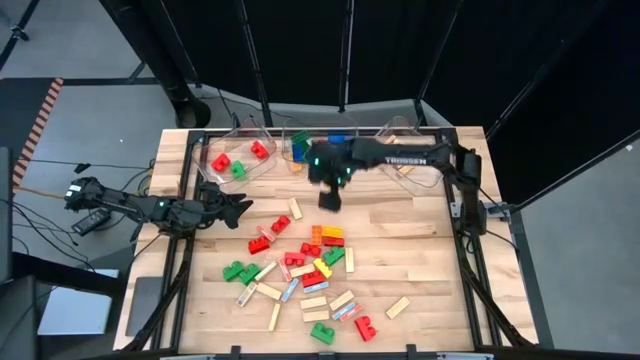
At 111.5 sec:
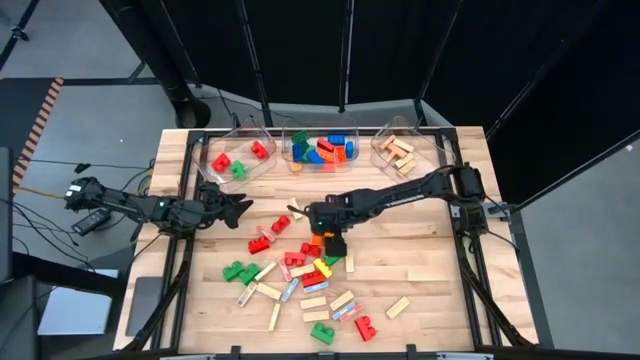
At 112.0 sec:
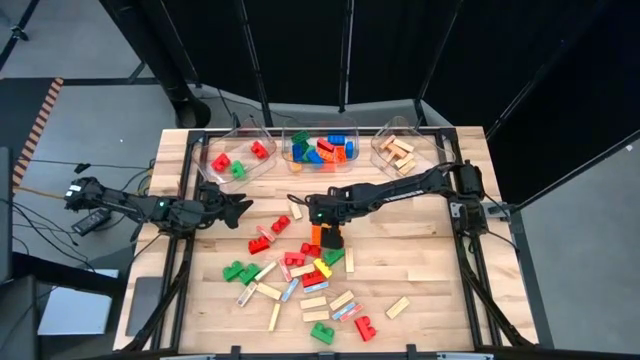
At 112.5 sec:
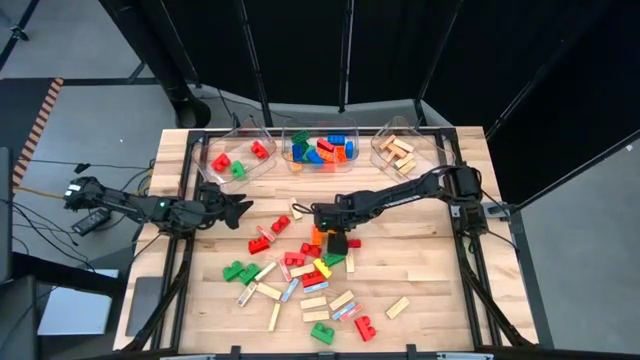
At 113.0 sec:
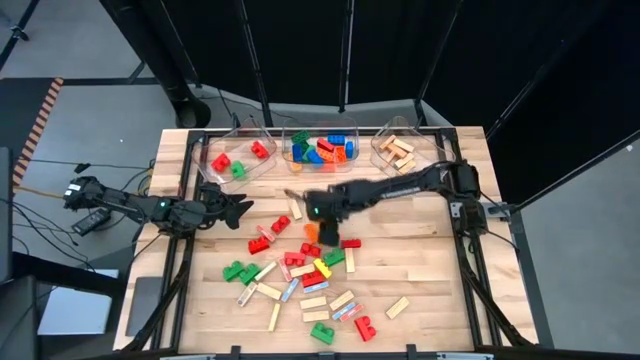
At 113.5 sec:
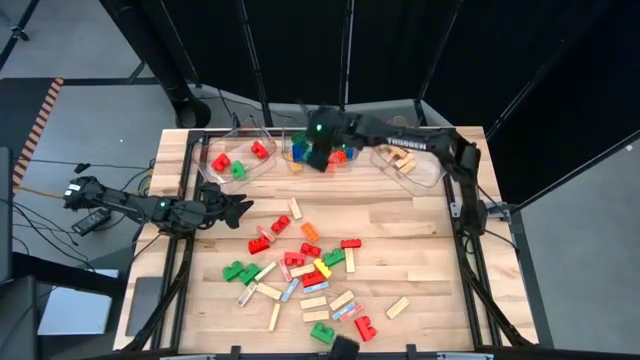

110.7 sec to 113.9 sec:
Task: Sort blocks by size
Put the large yellow game piece into the middle transparent bin

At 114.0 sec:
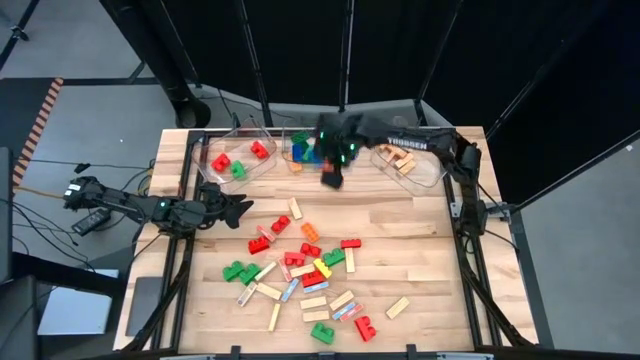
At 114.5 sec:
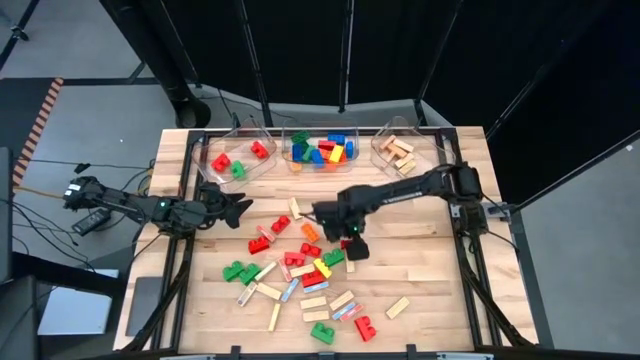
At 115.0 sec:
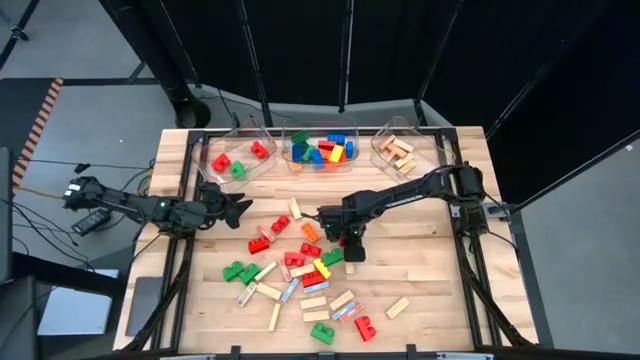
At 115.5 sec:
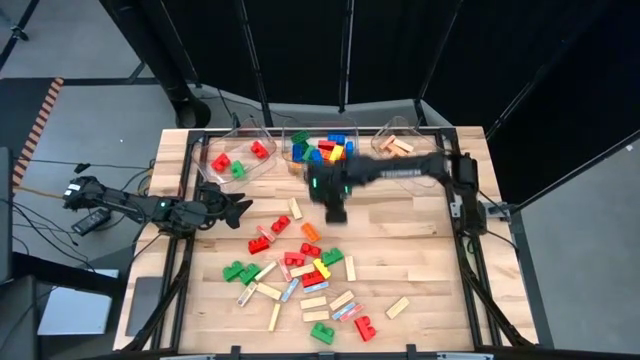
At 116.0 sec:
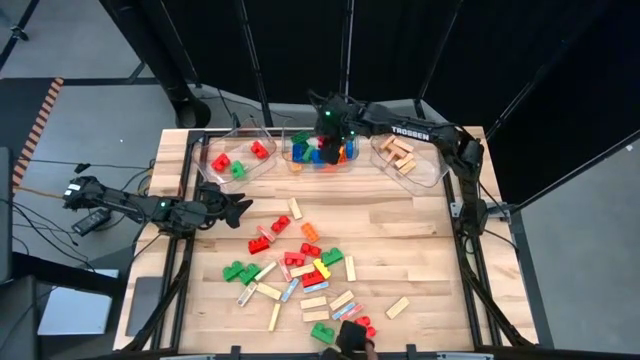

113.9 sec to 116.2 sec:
Put the large red game piece into the middle transparent bin

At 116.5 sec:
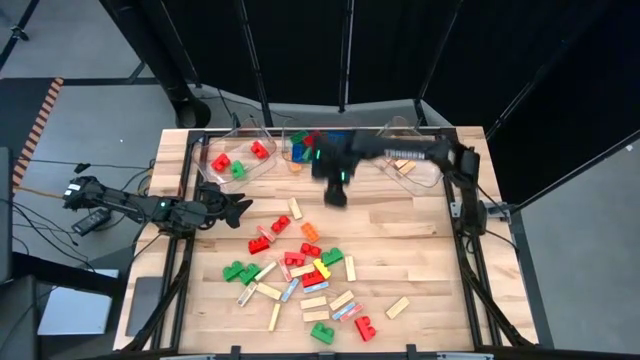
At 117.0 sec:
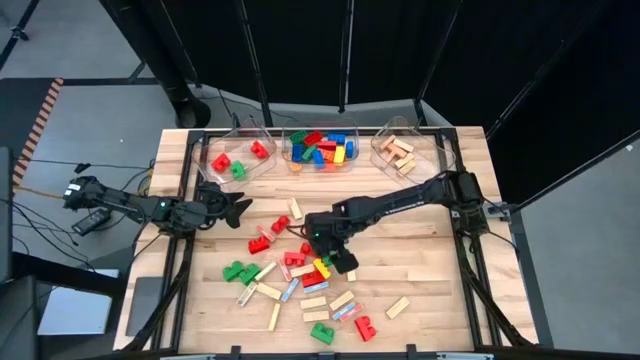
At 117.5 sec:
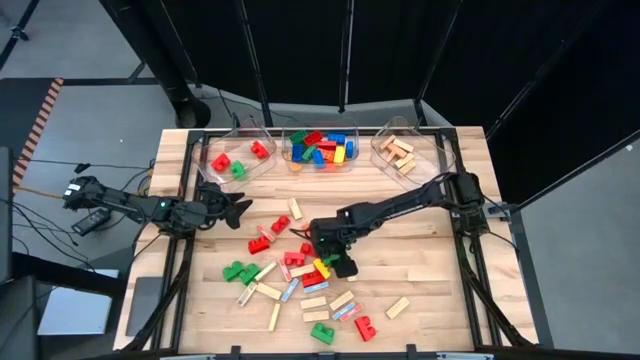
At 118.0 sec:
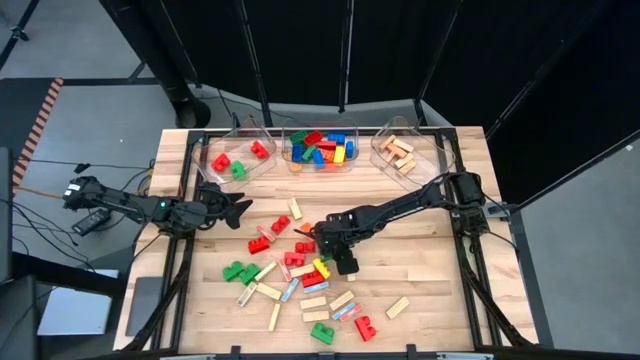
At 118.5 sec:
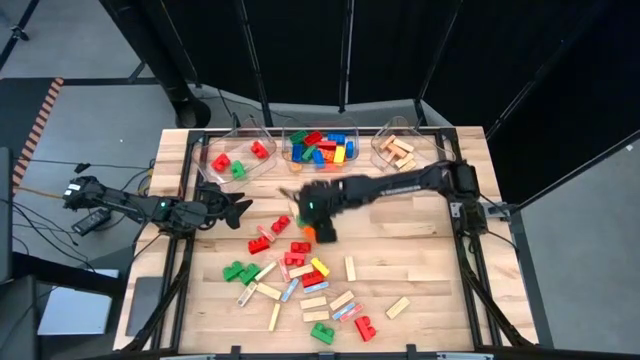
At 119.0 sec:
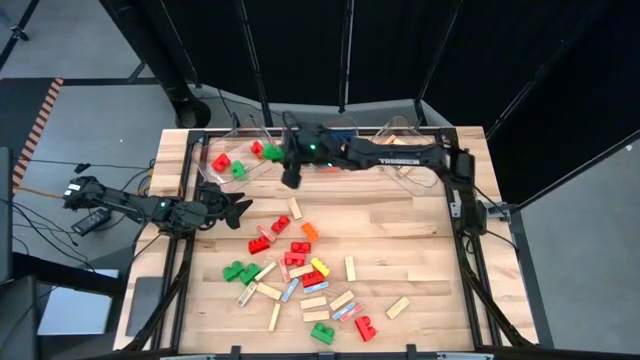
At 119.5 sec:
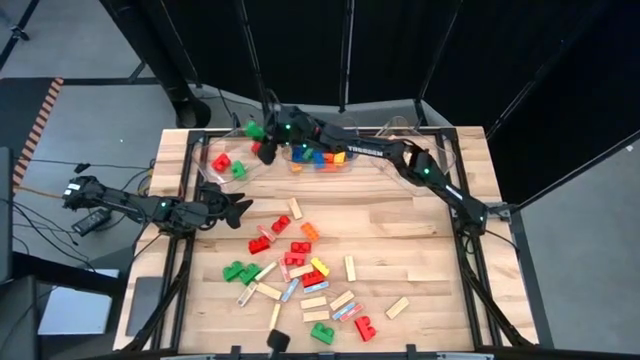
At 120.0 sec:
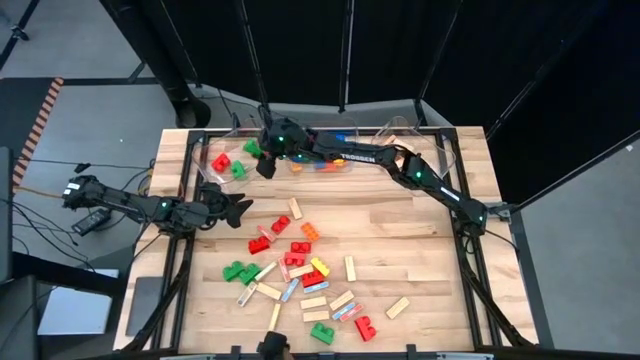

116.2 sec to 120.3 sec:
Put the small green game piece into the left transparent bin

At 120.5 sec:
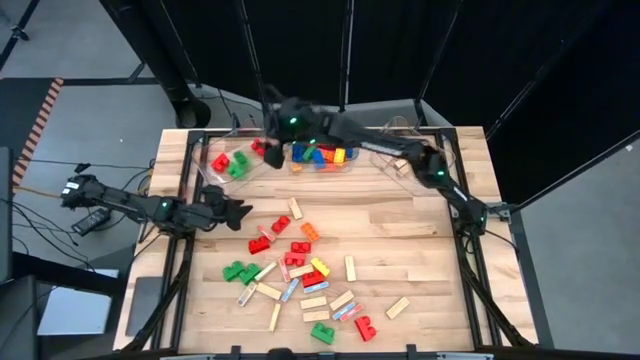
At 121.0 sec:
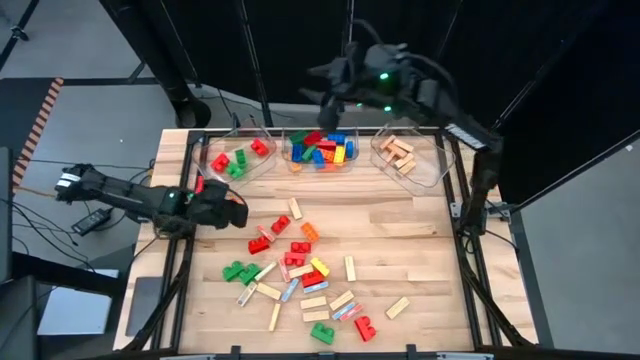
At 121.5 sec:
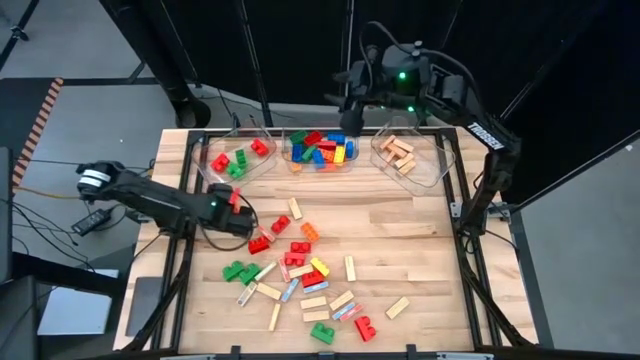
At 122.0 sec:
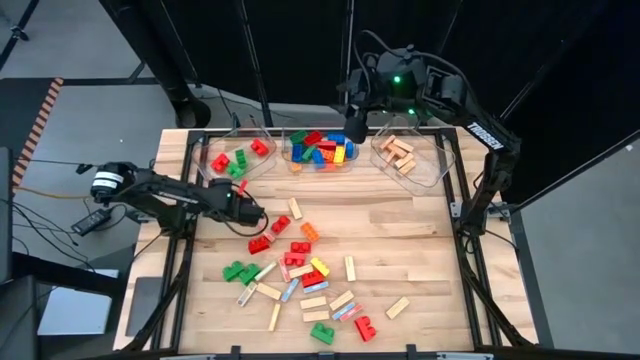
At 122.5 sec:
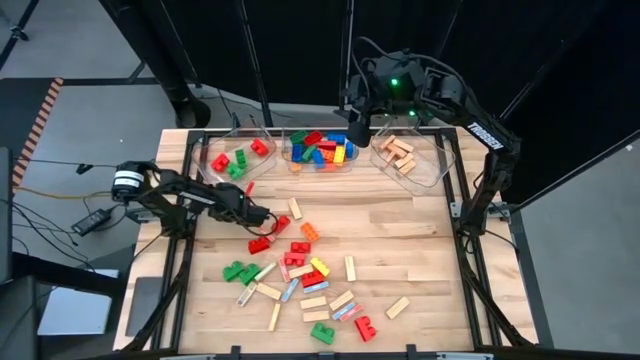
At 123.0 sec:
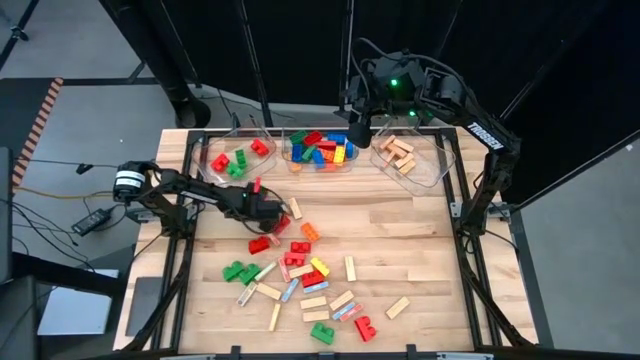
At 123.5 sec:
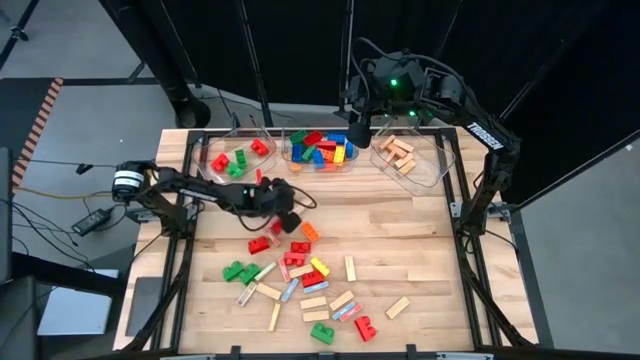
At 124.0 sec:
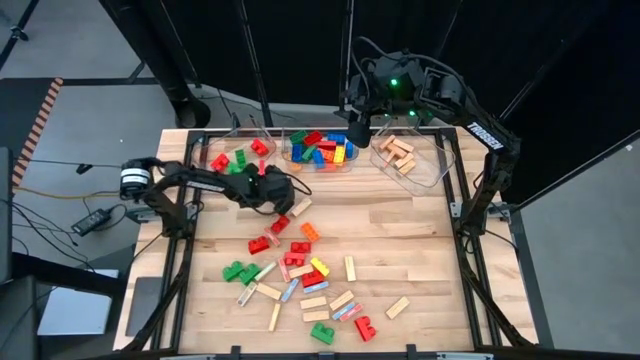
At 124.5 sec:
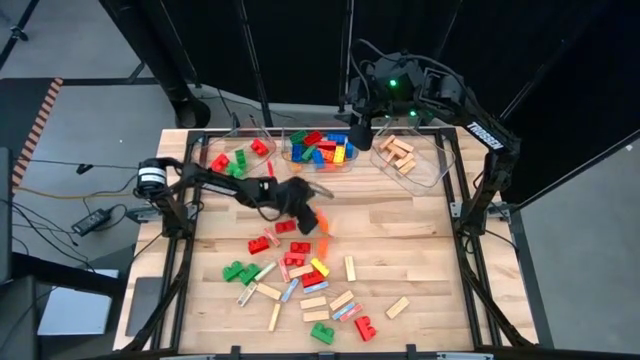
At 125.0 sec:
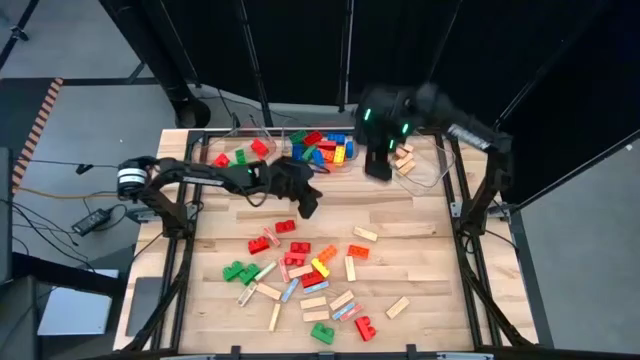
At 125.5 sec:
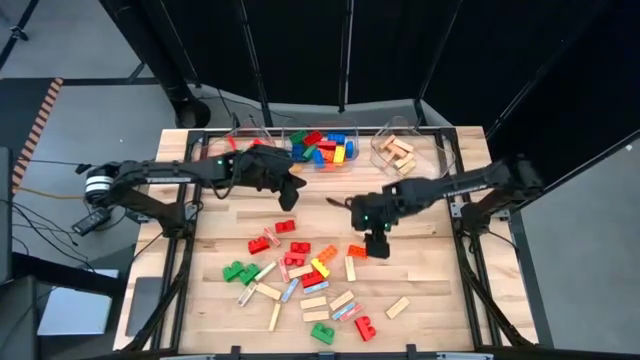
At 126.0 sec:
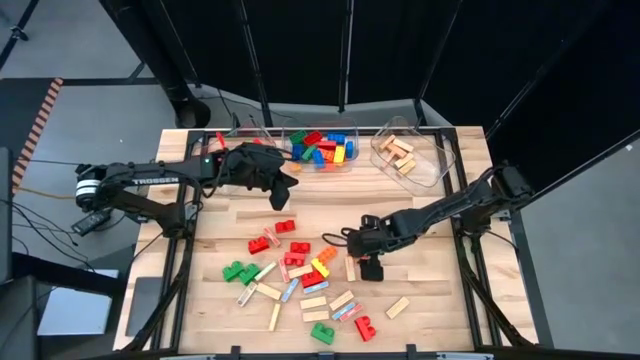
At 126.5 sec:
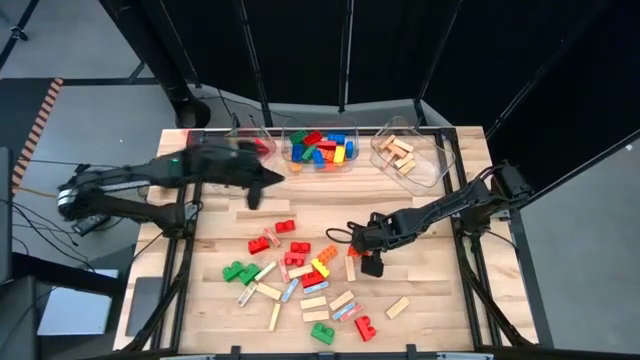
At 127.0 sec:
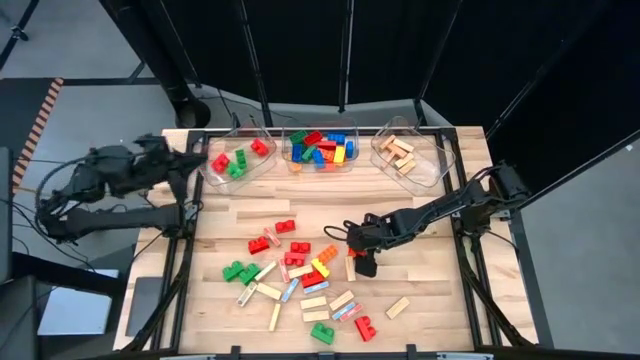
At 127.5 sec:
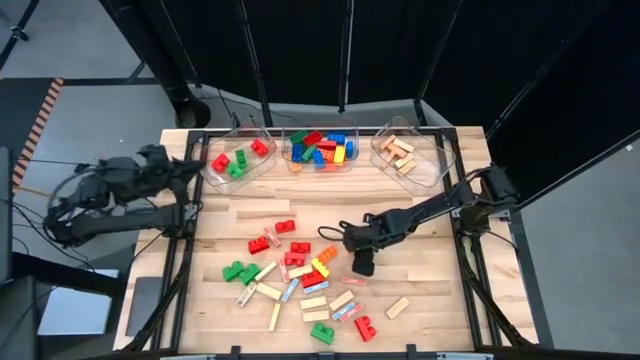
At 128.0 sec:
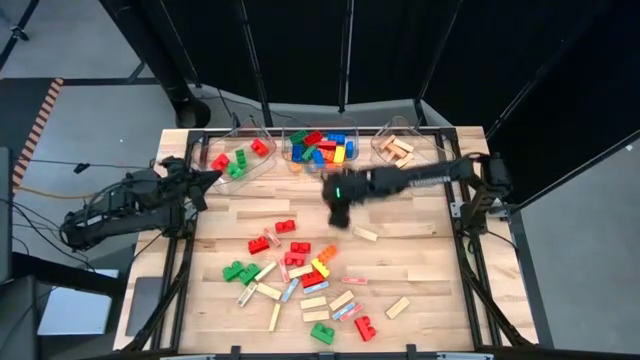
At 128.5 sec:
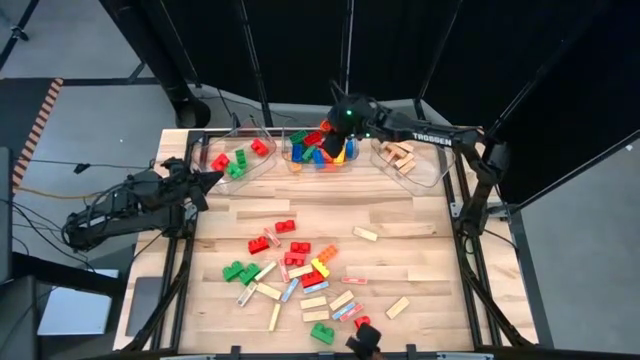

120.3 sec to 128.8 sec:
Put the large orange game piece into the middle transparent bin

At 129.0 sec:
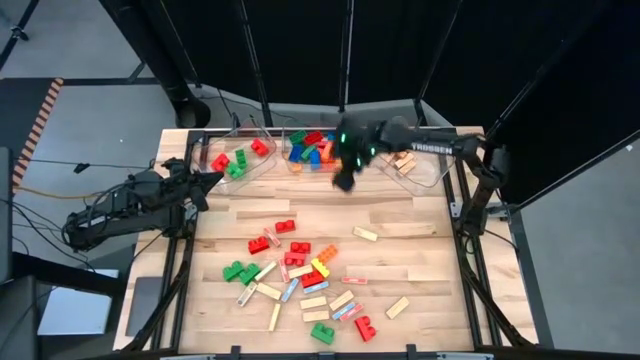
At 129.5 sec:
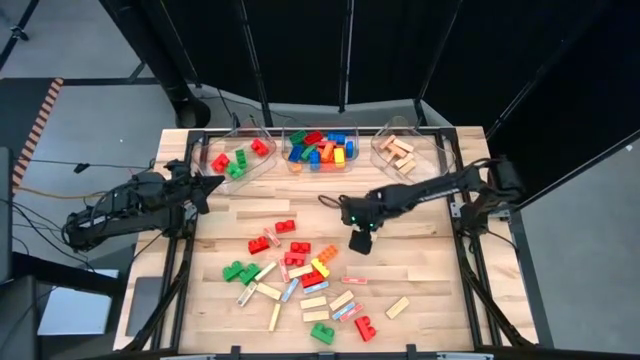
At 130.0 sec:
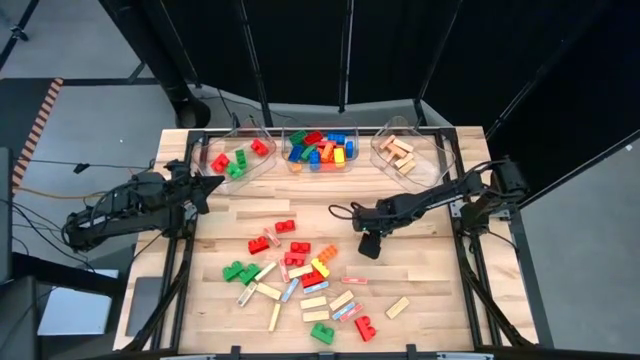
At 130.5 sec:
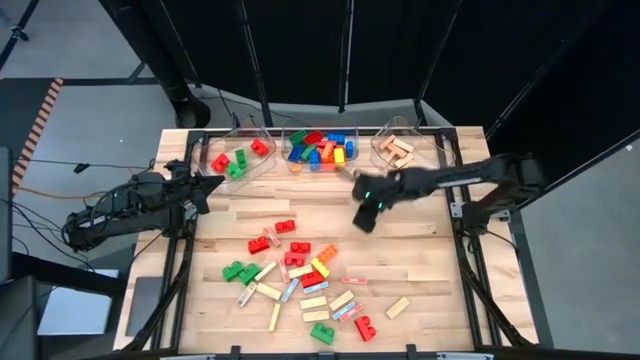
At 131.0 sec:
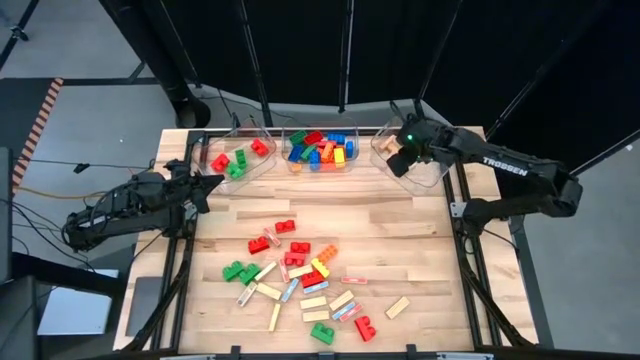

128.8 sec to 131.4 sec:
Put the brown wooden block into the right transparent bin

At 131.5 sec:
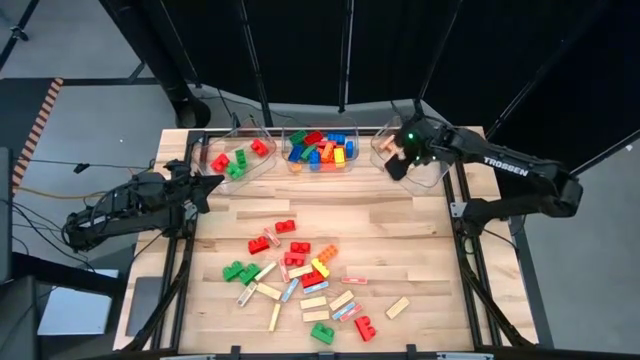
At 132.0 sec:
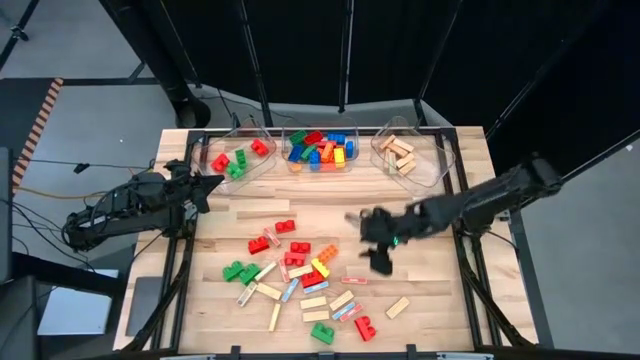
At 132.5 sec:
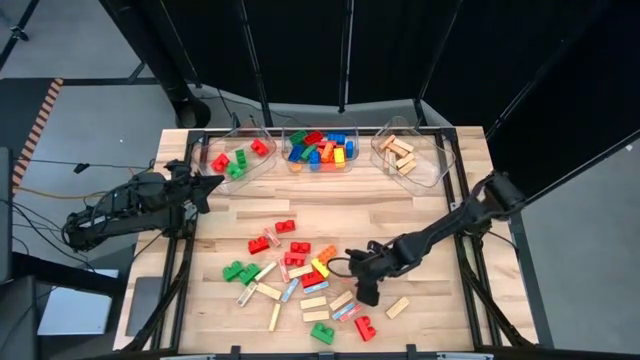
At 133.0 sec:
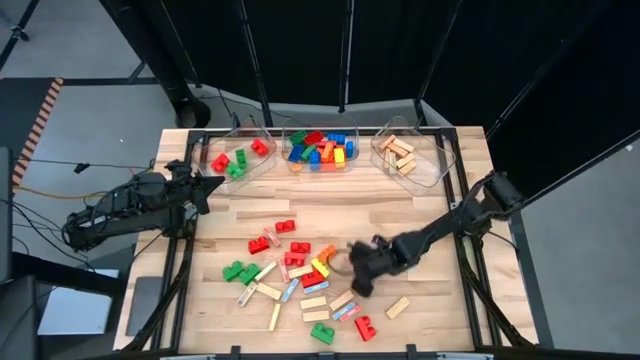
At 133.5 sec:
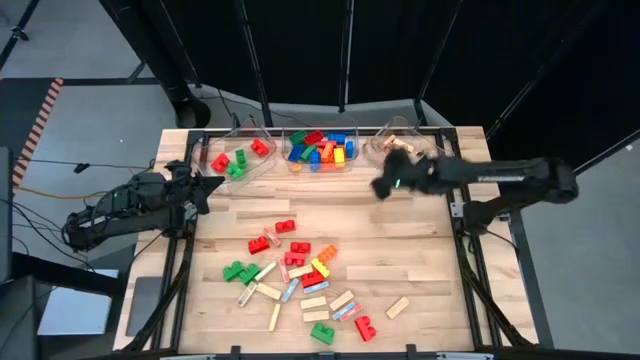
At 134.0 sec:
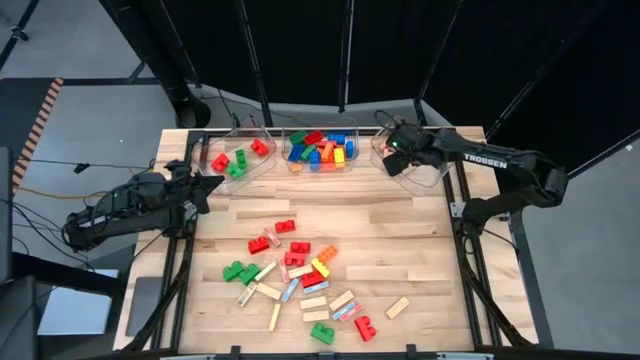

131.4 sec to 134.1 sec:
Put the brown wooden block into the right transparent bin
